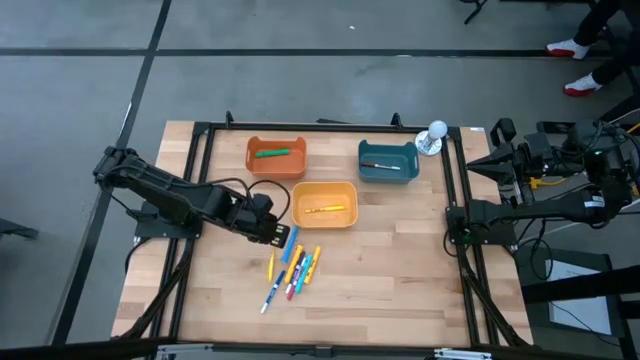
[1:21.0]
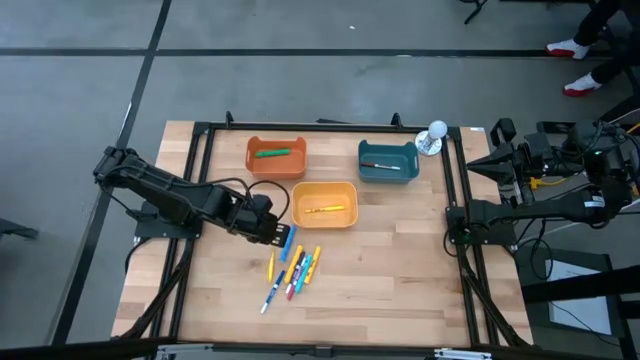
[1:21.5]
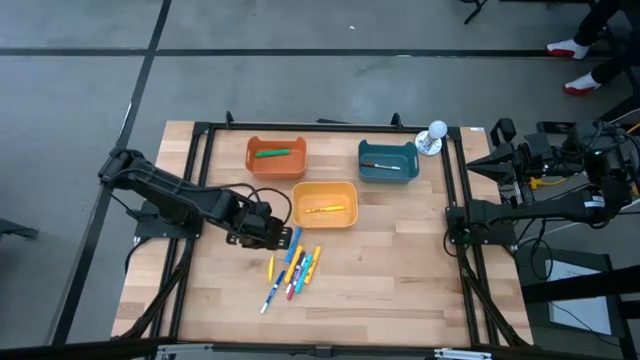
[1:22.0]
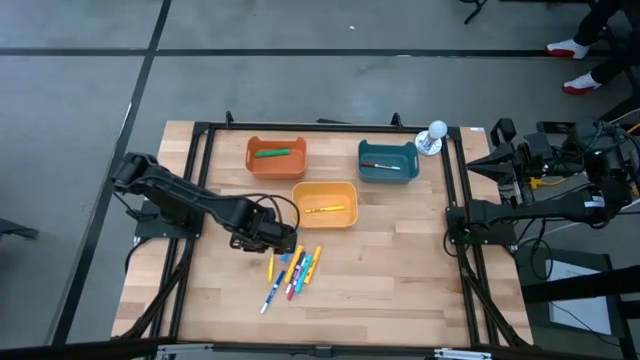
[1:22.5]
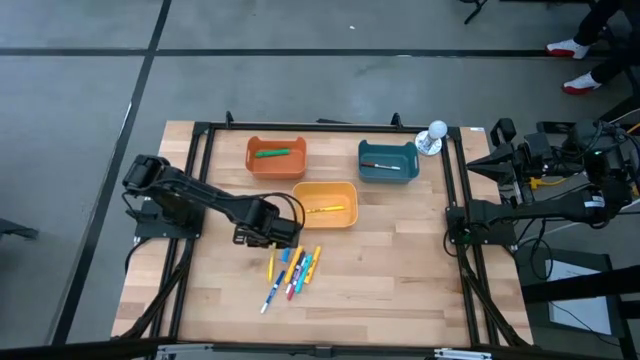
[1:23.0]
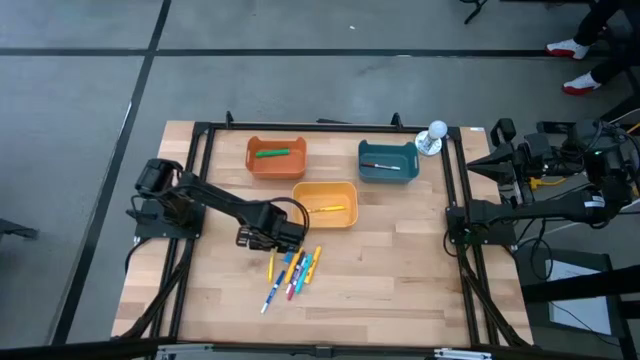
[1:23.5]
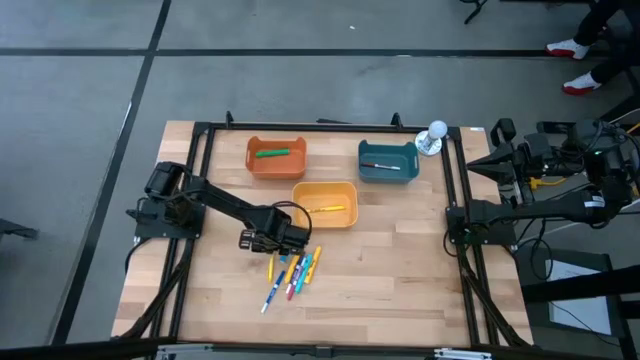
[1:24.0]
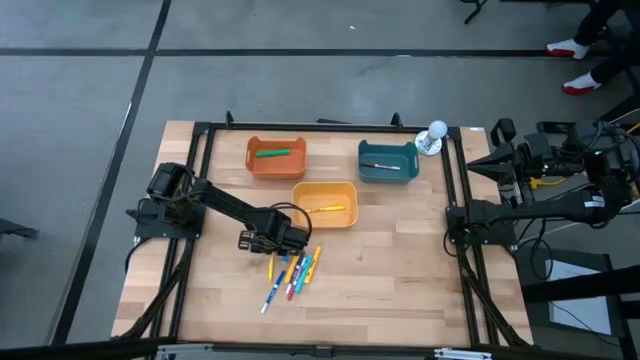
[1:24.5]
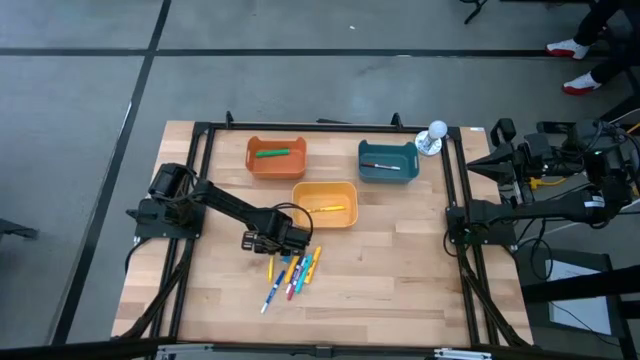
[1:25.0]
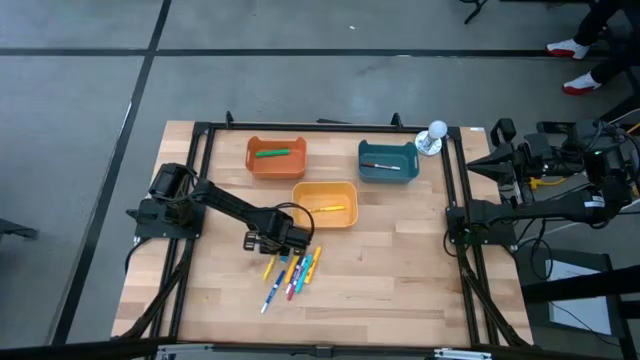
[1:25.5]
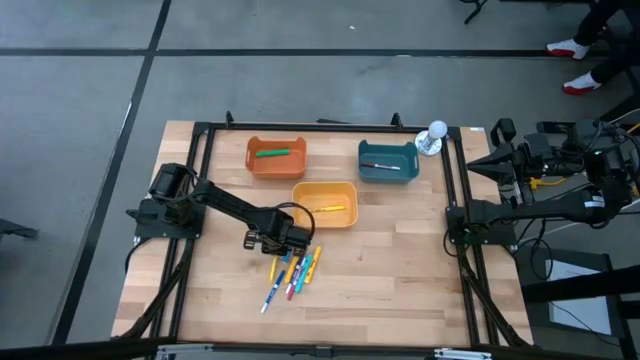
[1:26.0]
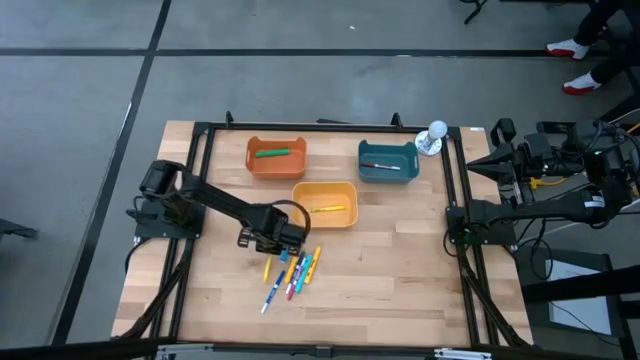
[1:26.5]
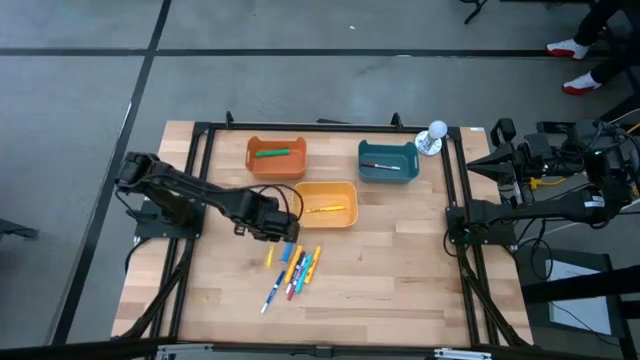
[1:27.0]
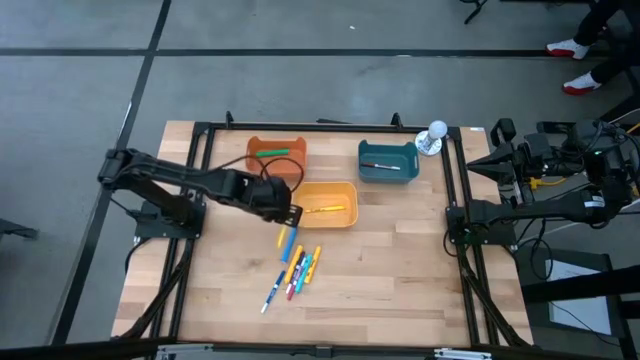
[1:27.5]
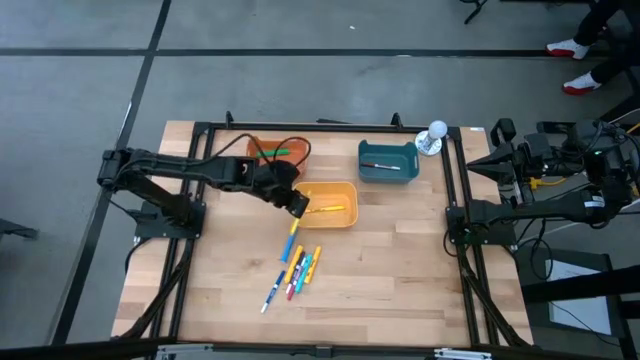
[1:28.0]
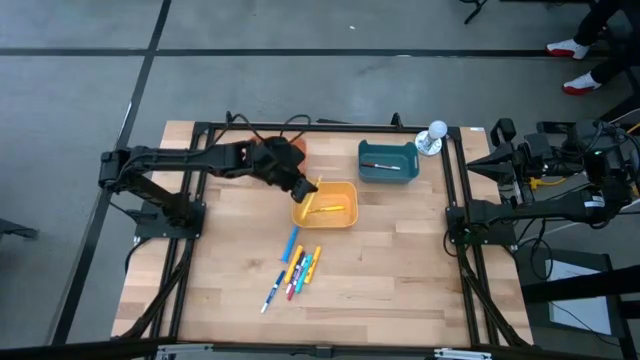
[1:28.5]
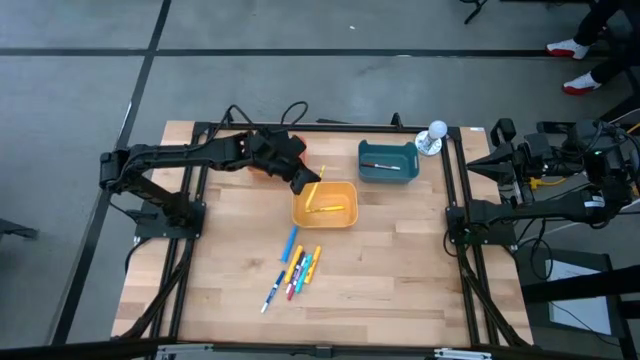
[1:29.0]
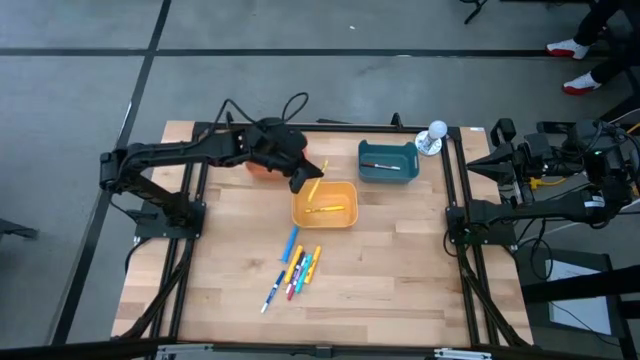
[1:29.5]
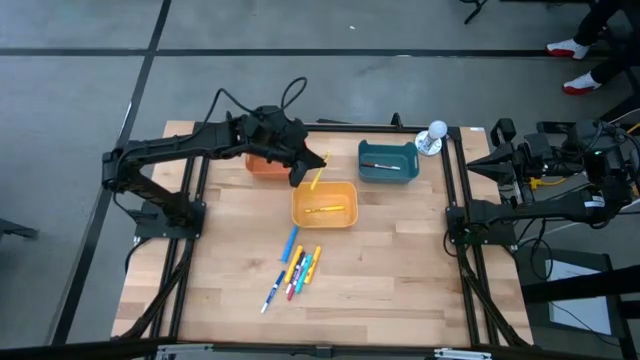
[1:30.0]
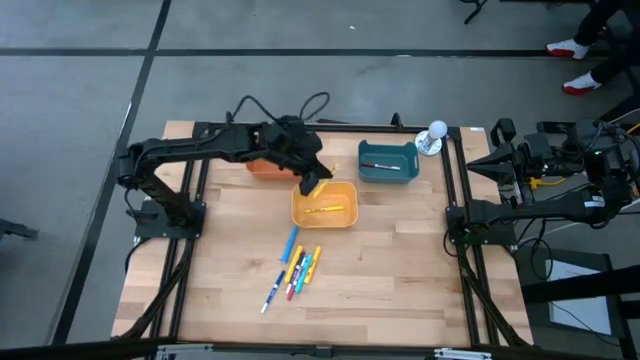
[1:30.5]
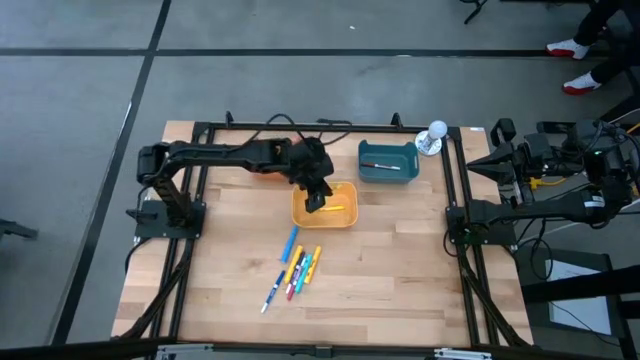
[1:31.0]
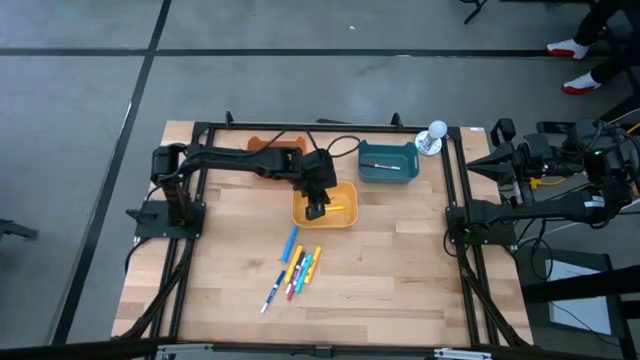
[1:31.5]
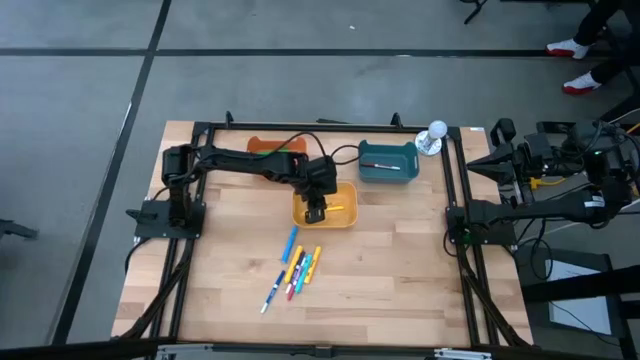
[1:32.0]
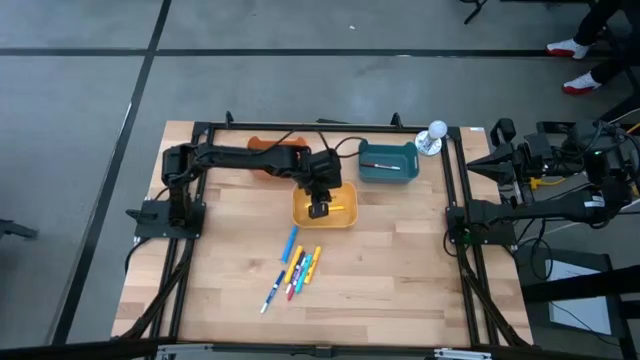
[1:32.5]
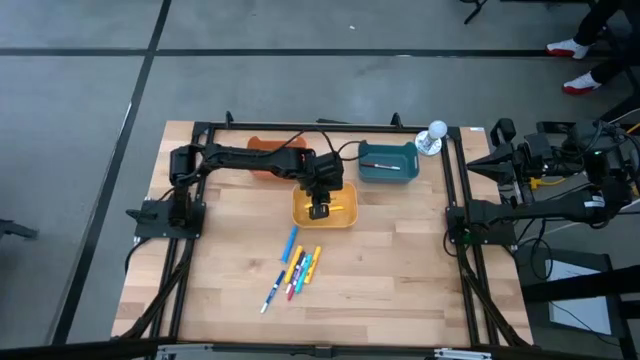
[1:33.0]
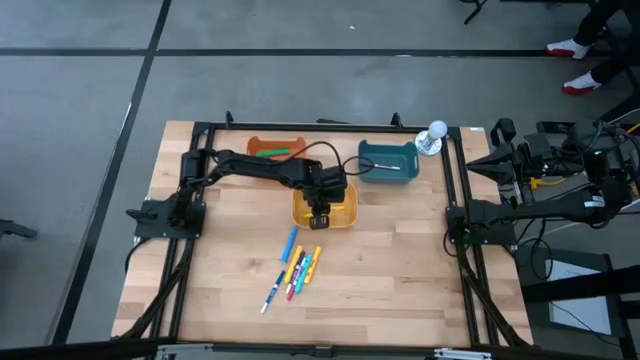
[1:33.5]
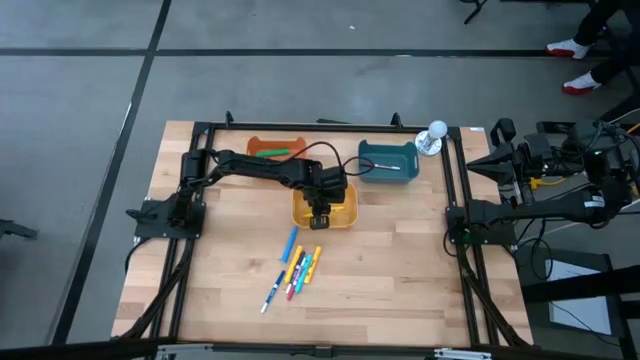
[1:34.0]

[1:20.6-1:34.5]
Task: Pick & Place Markers
Put the small yellow highlighter into the yellow bin

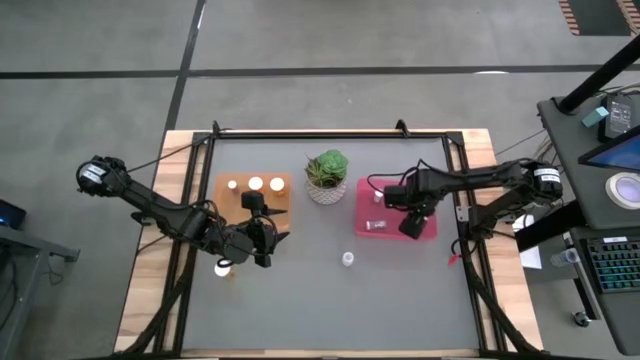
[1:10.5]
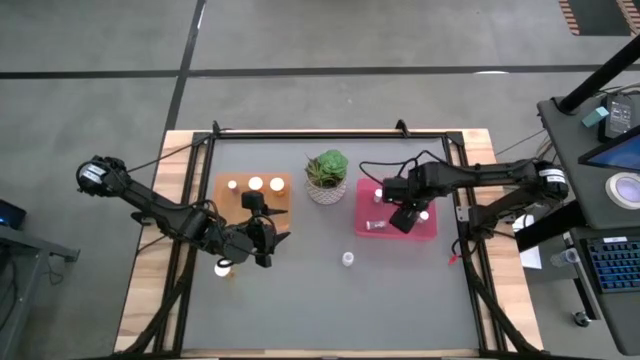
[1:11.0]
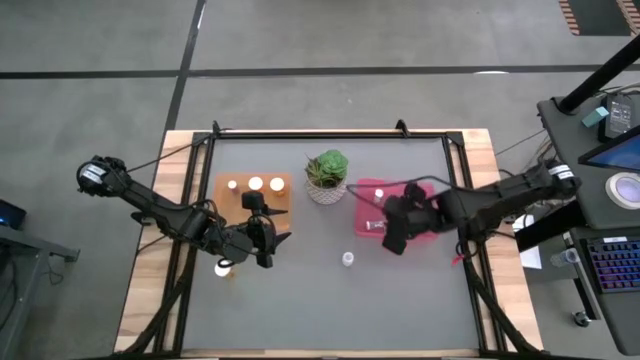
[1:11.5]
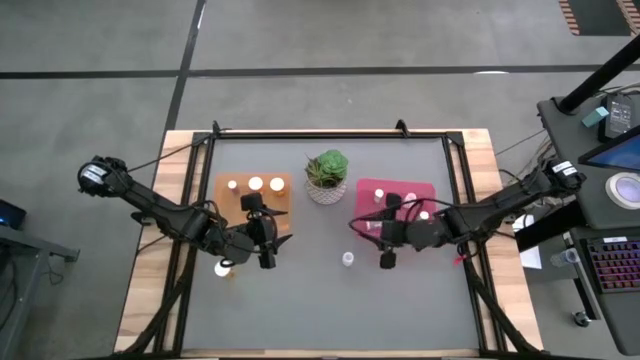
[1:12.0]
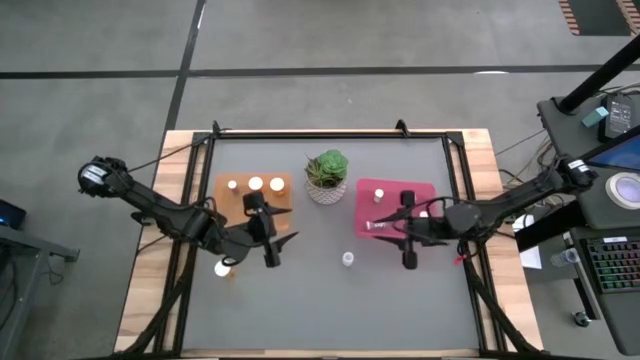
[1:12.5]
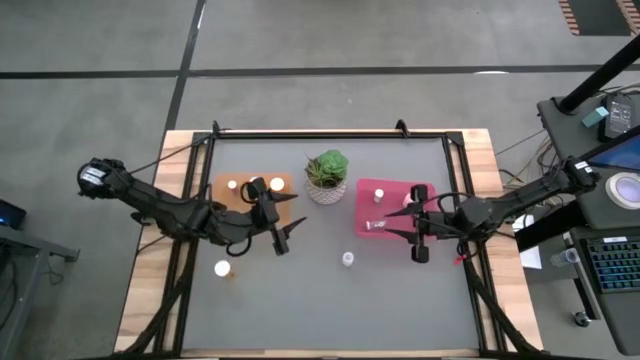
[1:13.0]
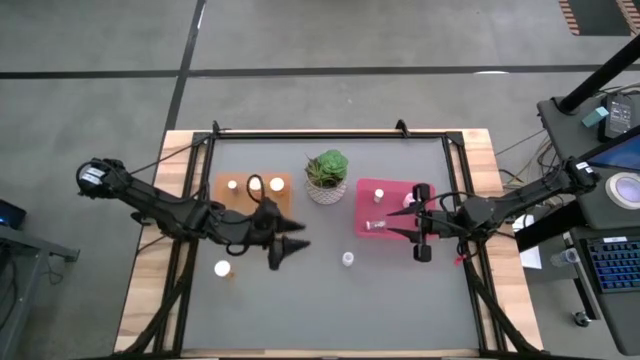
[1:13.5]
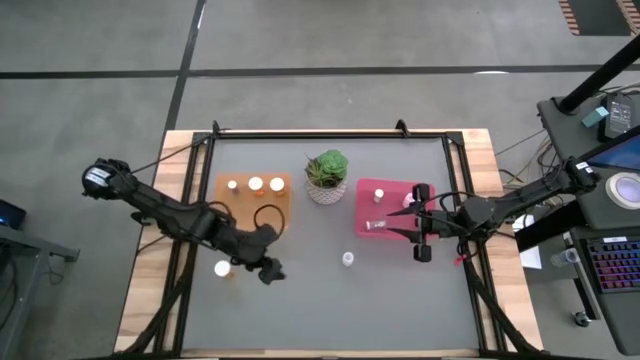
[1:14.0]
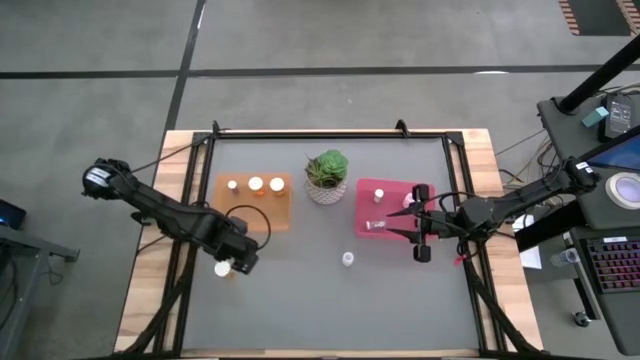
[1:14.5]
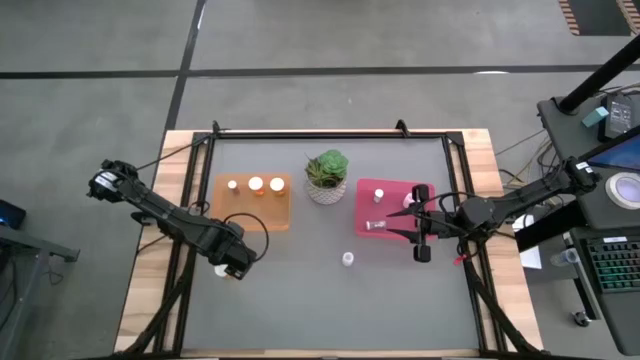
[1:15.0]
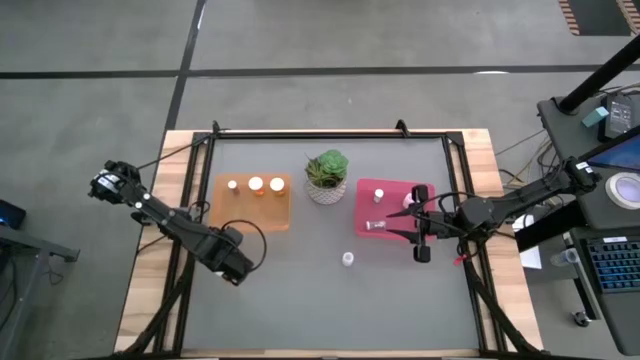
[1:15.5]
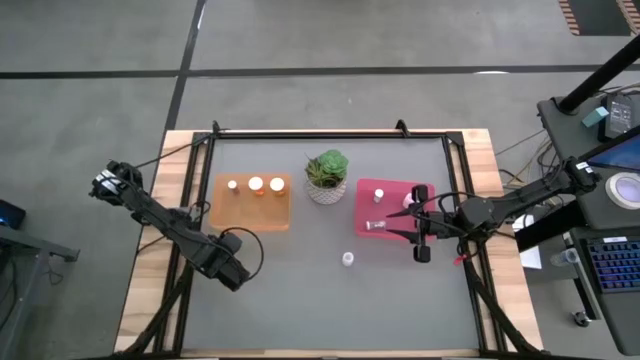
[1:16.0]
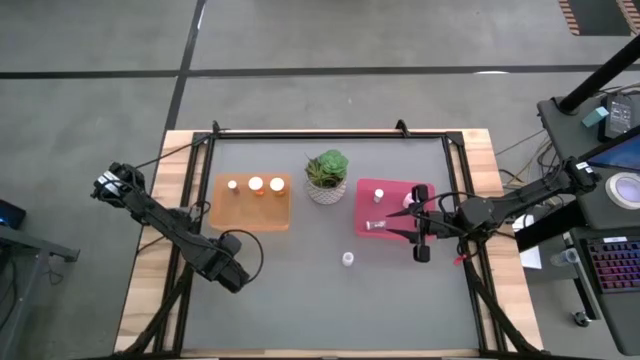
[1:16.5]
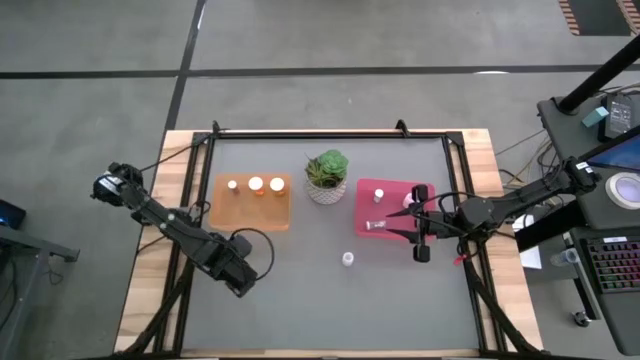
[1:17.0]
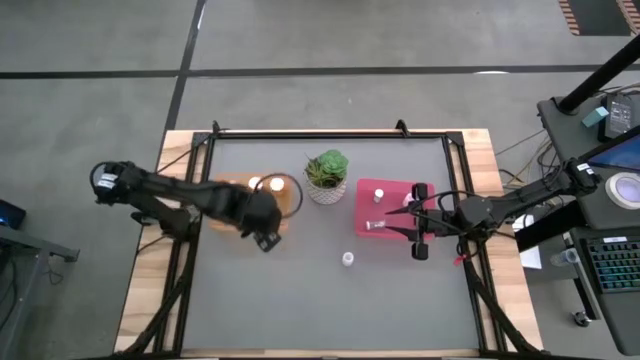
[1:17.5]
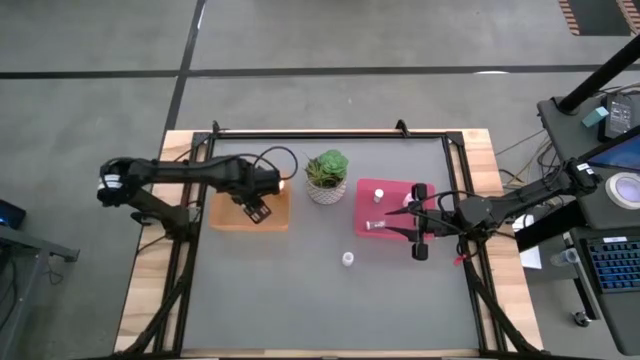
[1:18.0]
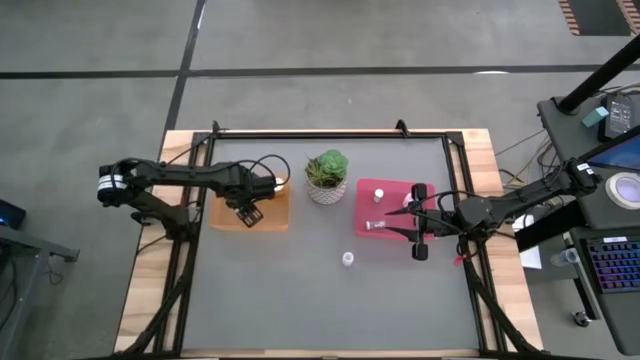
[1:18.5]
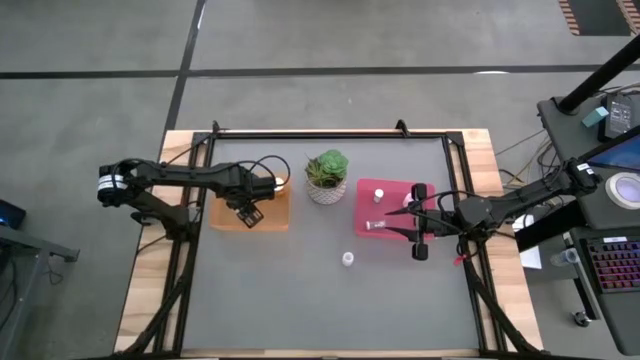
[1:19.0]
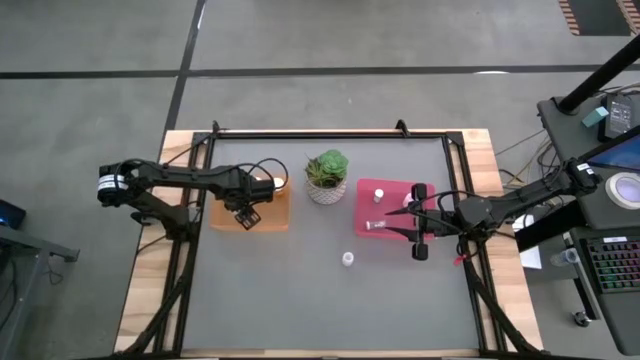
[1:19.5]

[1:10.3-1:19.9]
Task: Pick and place medicine bottles into bin by pill shape (circle, oval)
Put the large orange pill bottle in the orange bin
